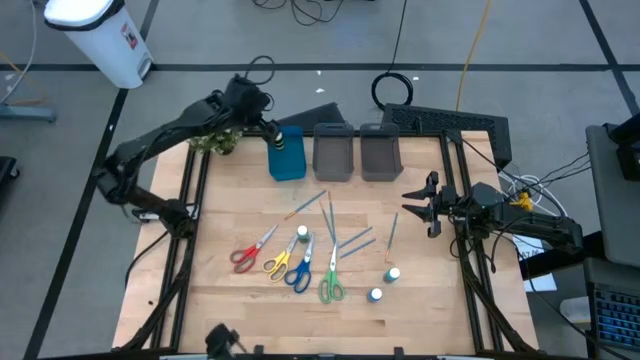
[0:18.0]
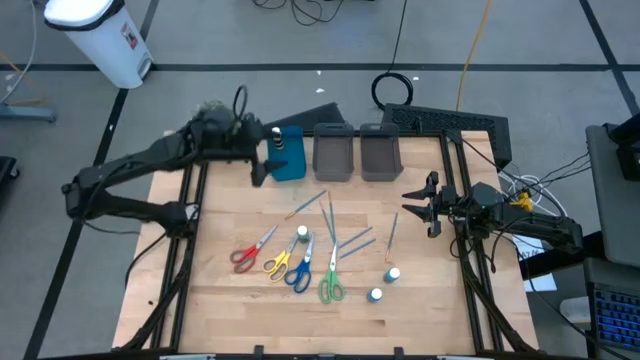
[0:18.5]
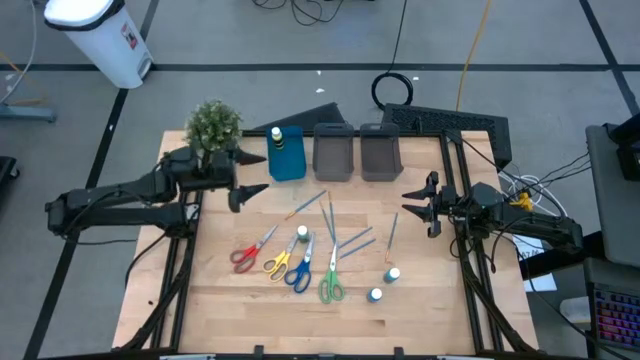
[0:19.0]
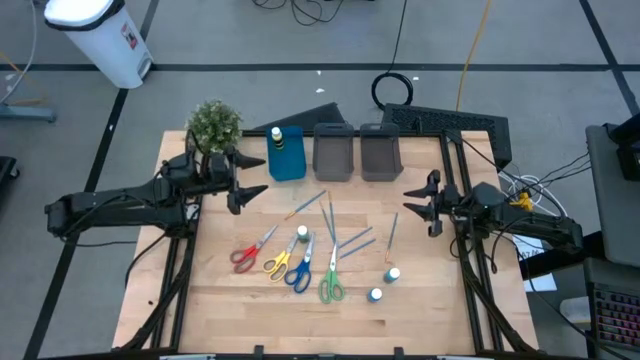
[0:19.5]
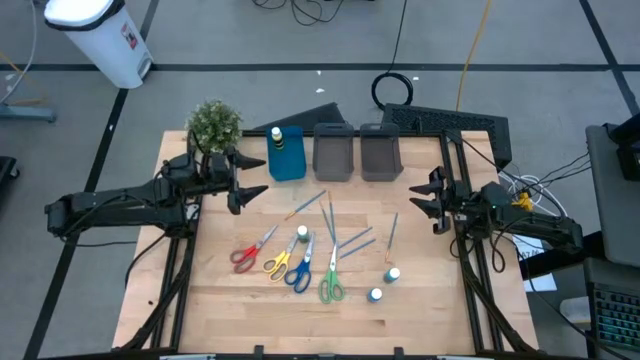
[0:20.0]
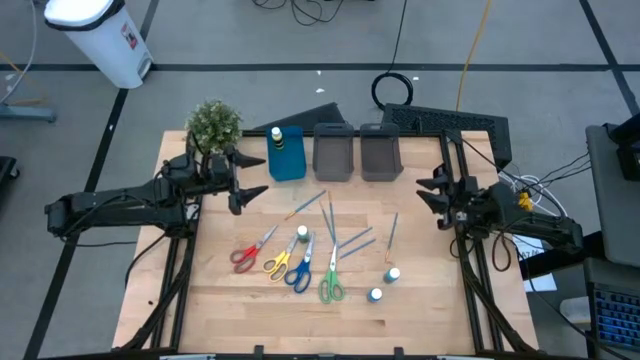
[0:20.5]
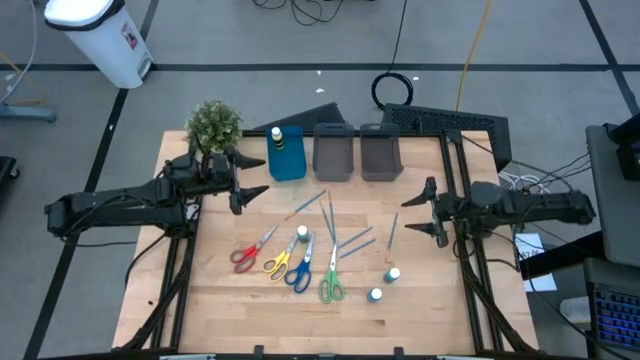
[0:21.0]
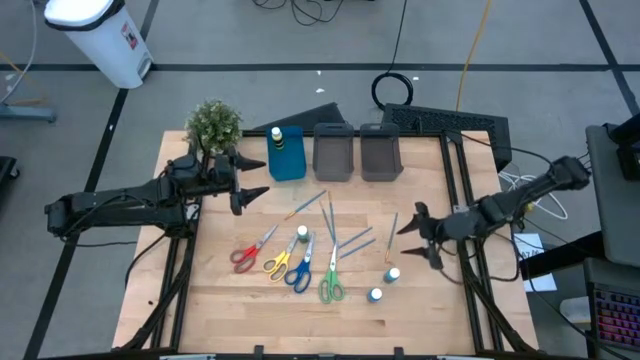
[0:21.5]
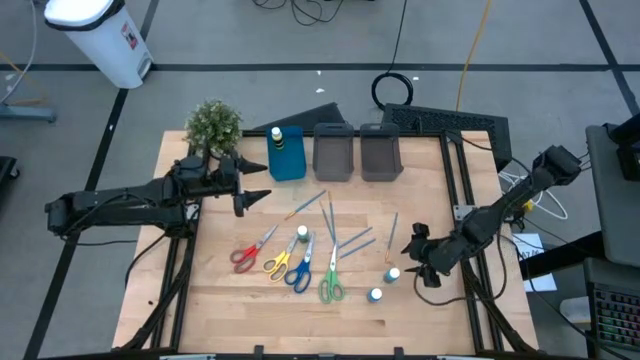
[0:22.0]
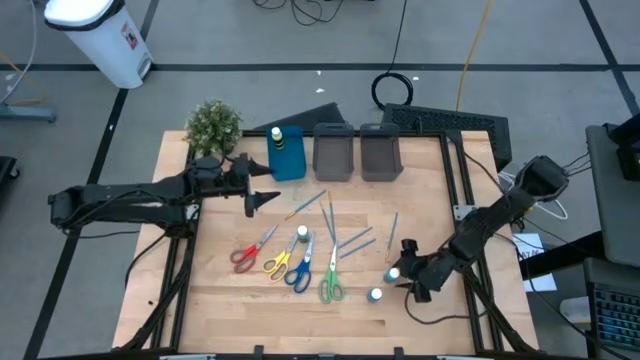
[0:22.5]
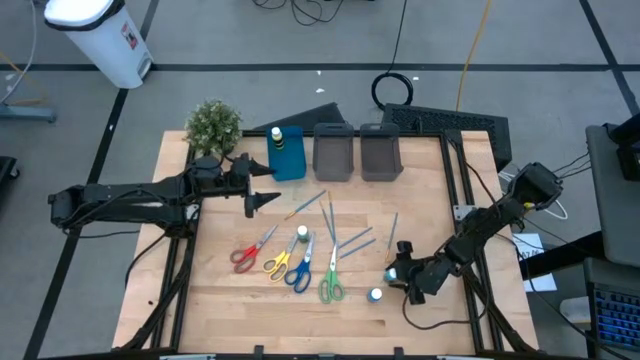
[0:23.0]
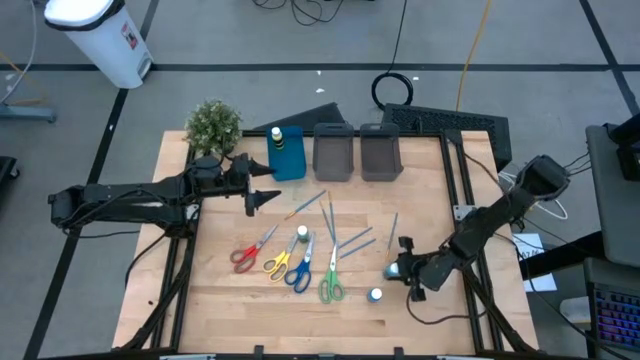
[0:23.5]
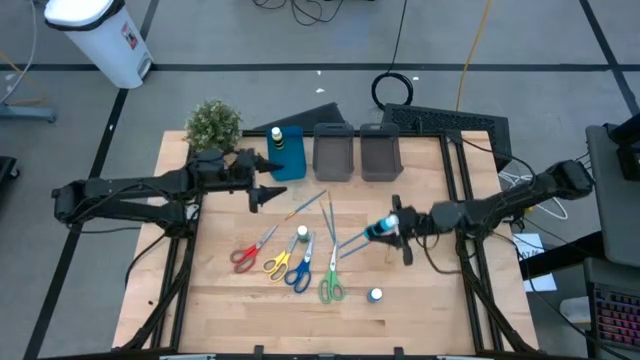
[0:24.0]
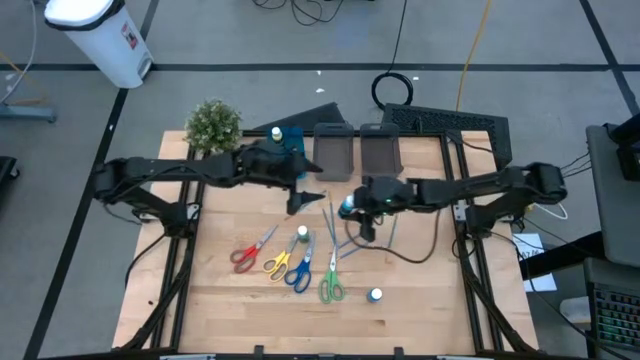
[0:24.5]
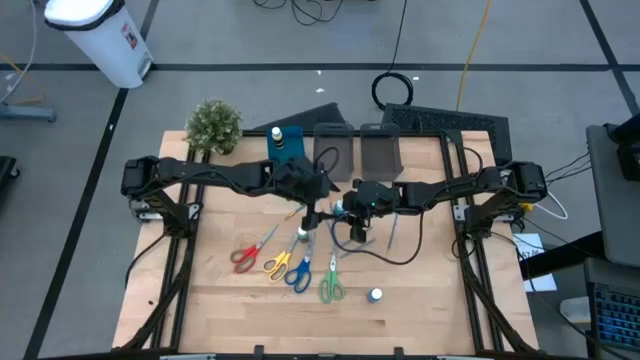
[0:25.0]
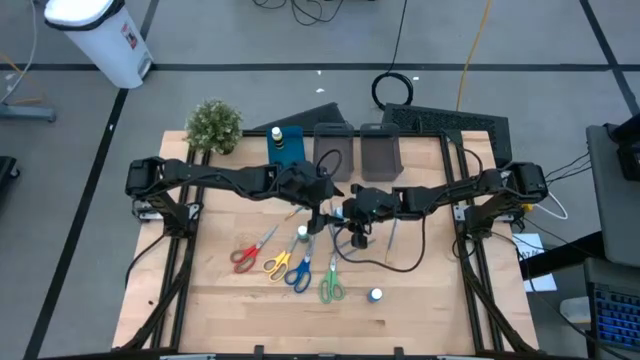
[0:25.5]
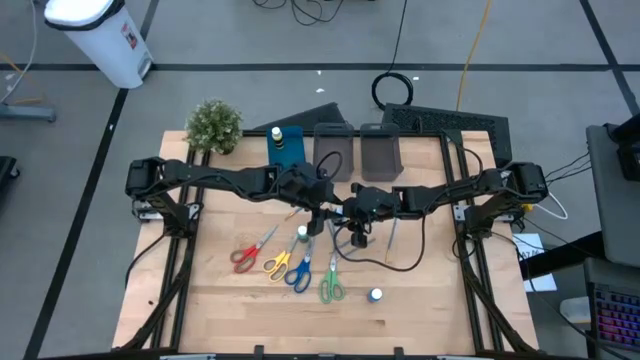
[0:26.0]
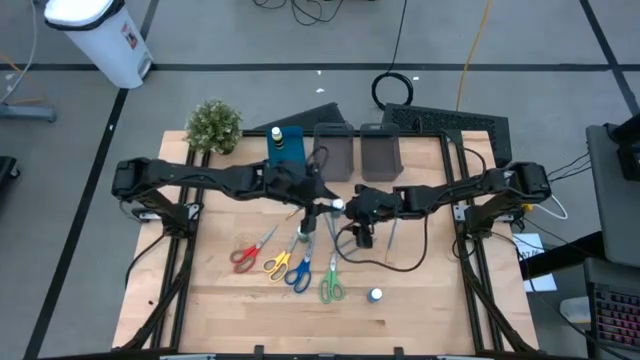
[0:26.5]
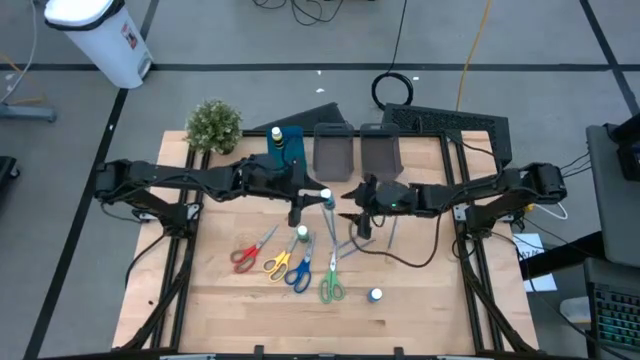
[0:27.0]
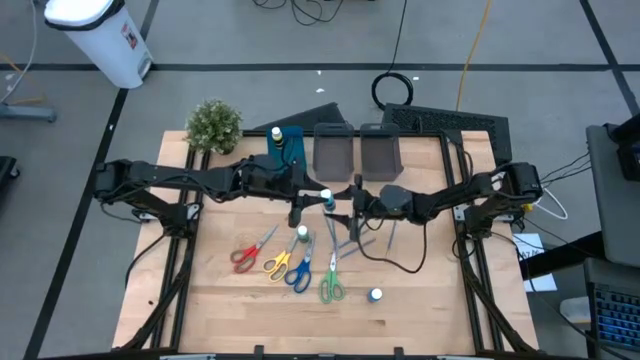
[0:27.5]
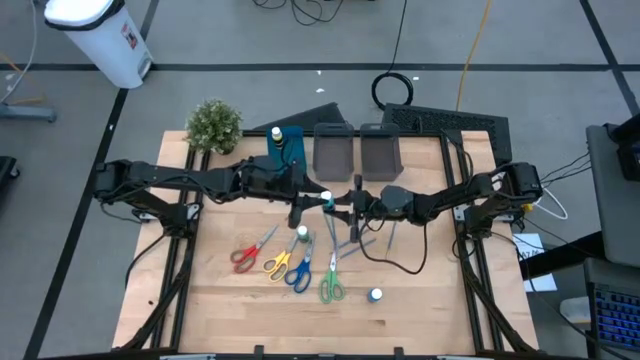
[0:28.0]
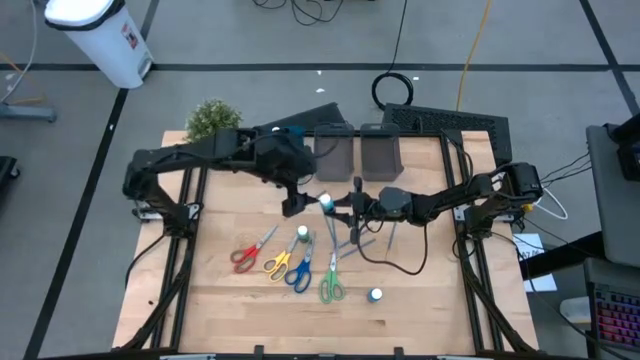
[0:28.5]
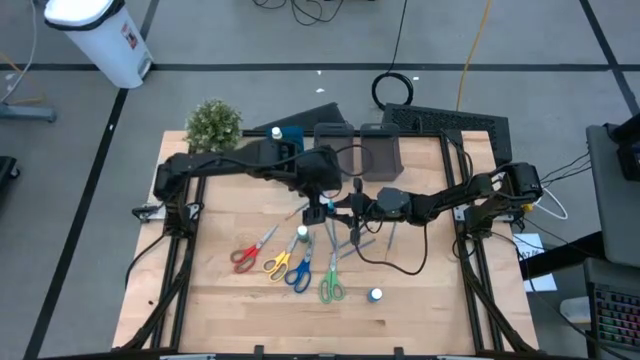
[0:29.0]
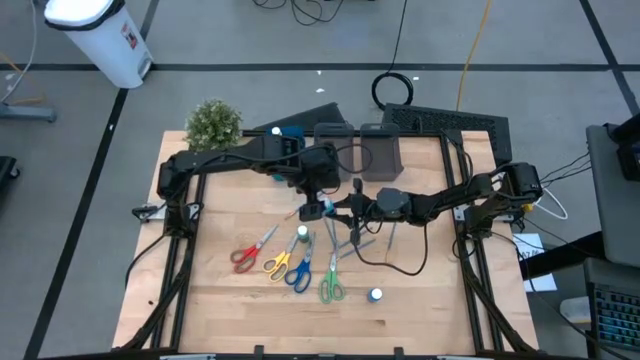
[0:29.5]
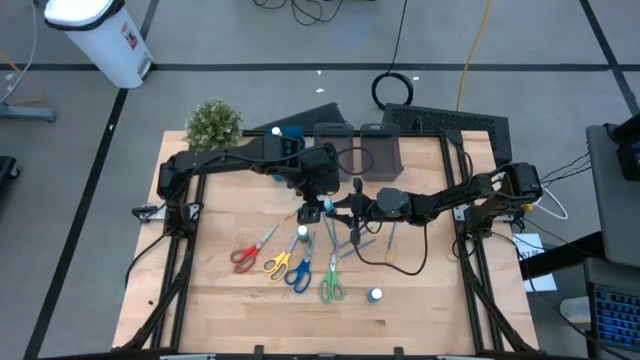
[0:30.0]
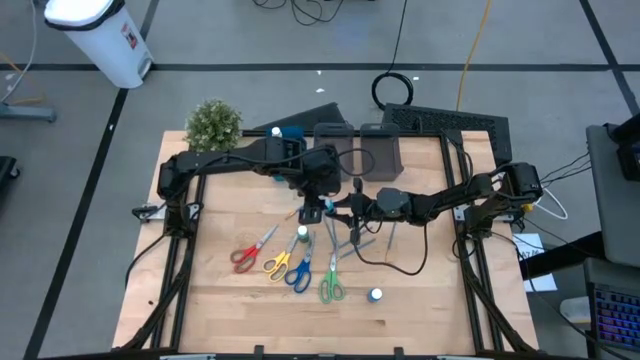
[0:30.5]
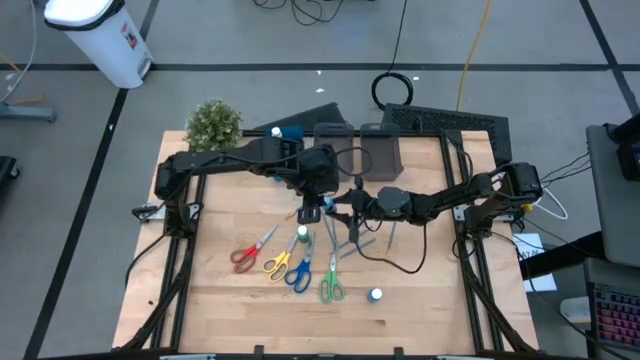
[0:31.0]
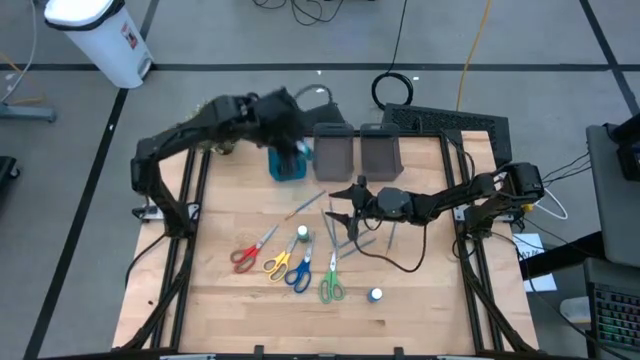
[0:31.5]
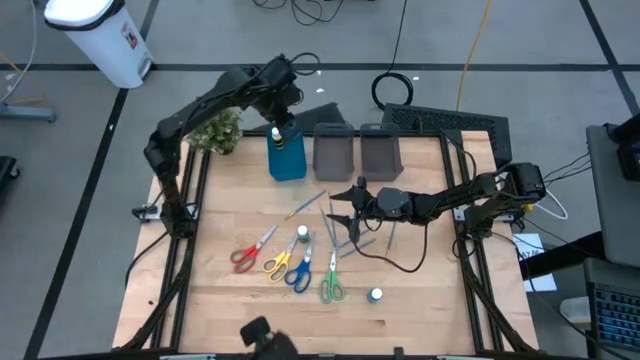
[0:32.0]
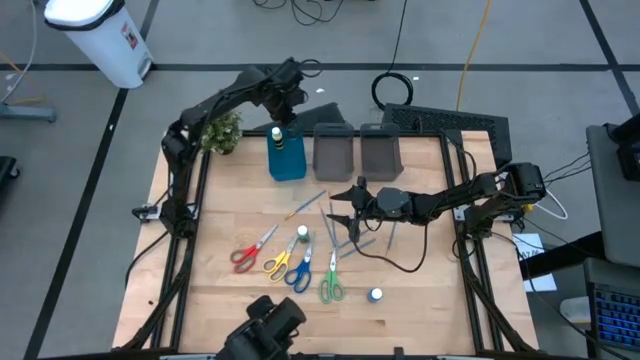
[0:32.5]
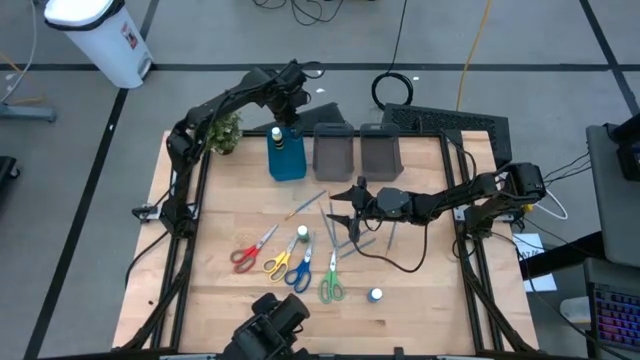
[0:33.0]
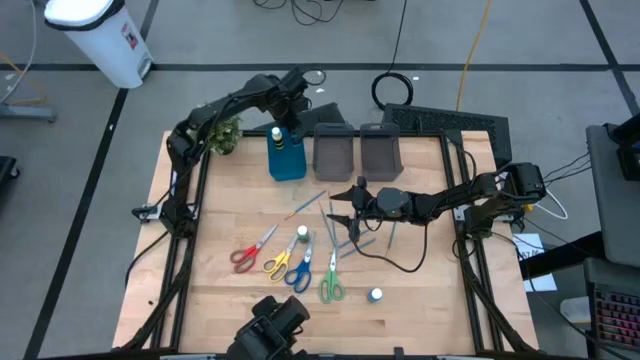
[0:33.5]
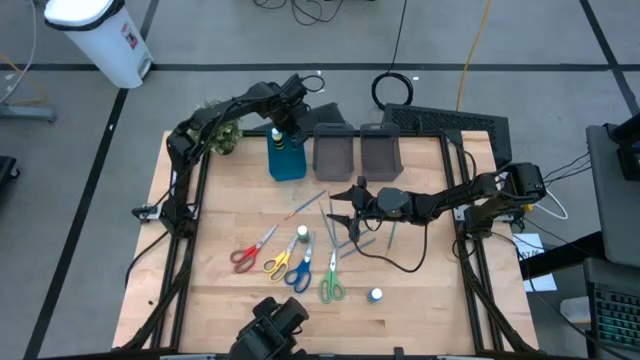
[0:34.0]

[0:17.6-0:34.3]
Task: Pick & Place Paint Supplies
Put the light blue paint into the blue bin

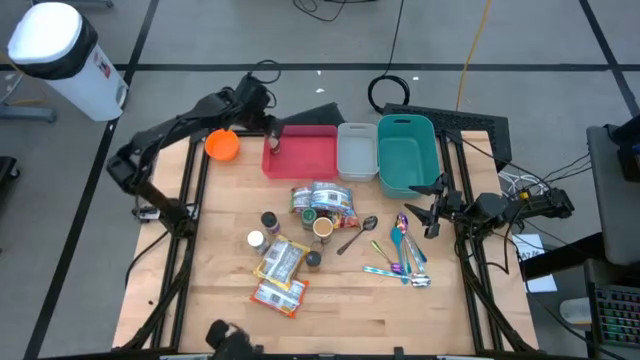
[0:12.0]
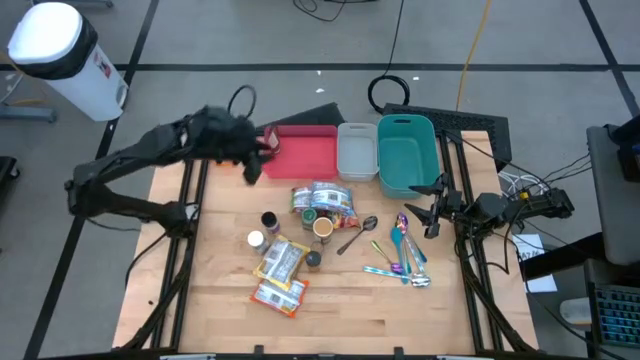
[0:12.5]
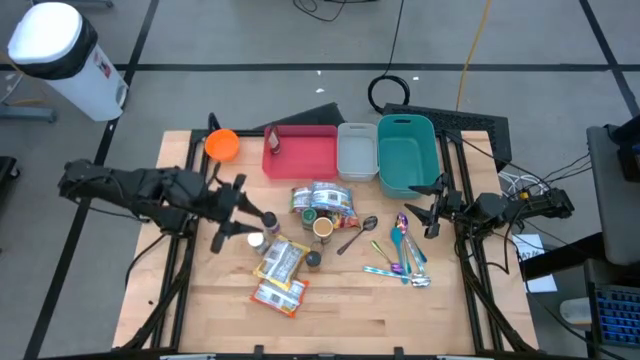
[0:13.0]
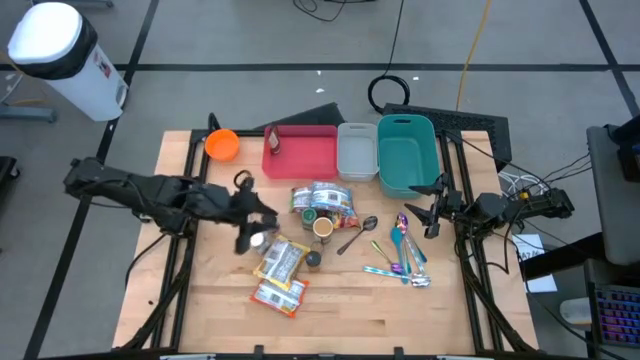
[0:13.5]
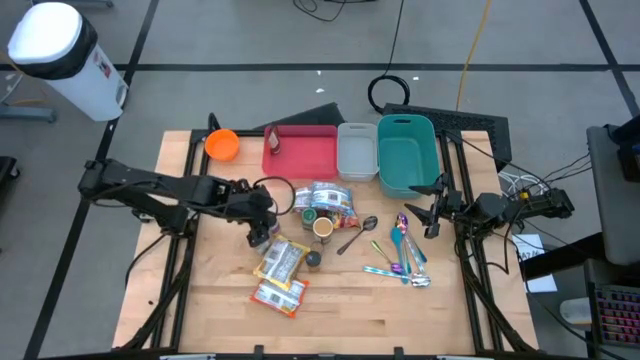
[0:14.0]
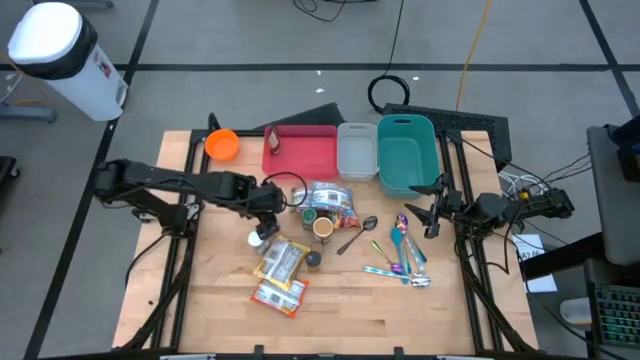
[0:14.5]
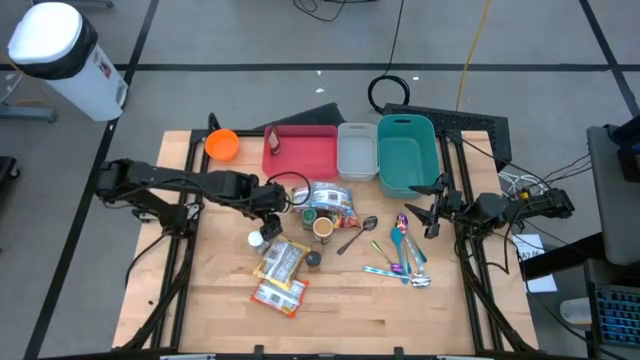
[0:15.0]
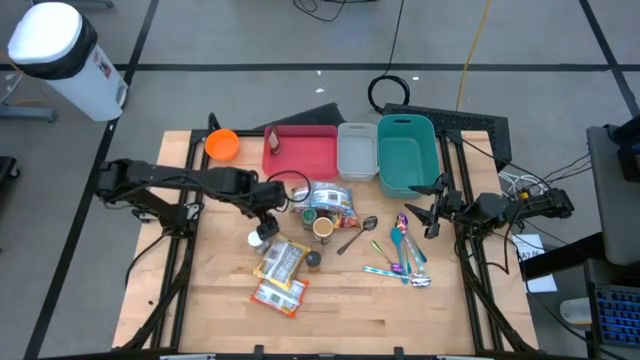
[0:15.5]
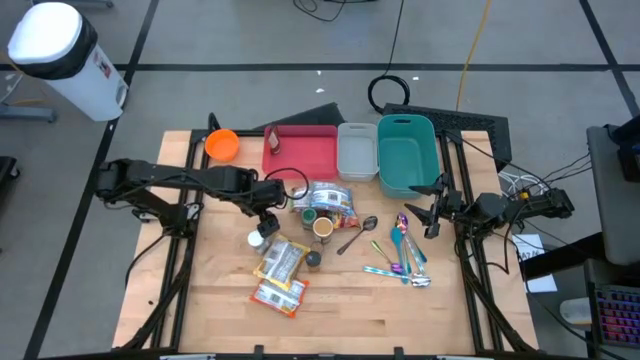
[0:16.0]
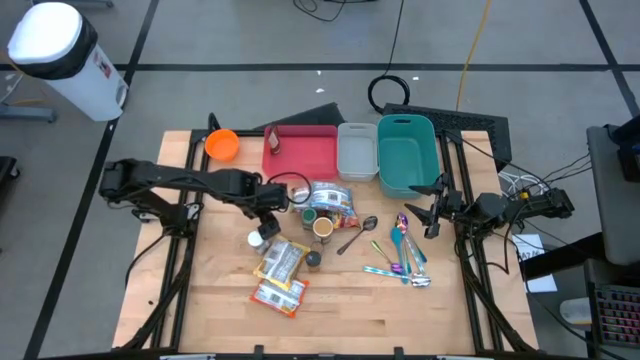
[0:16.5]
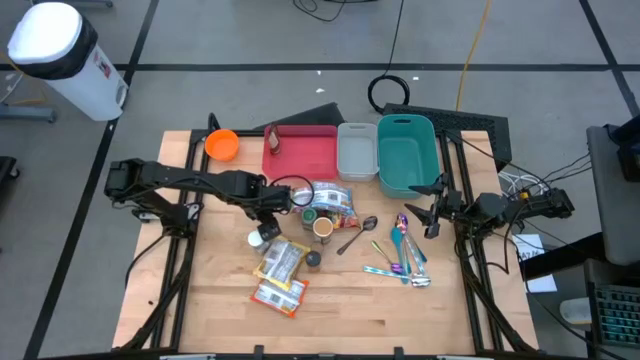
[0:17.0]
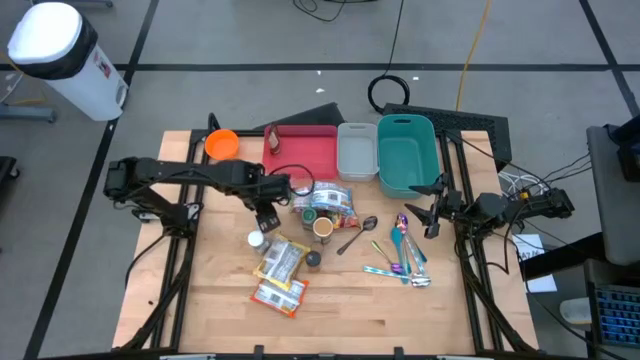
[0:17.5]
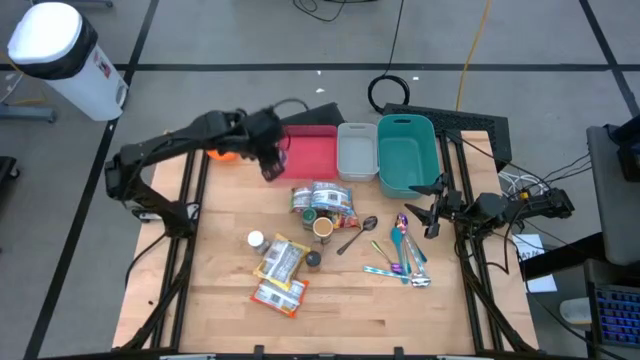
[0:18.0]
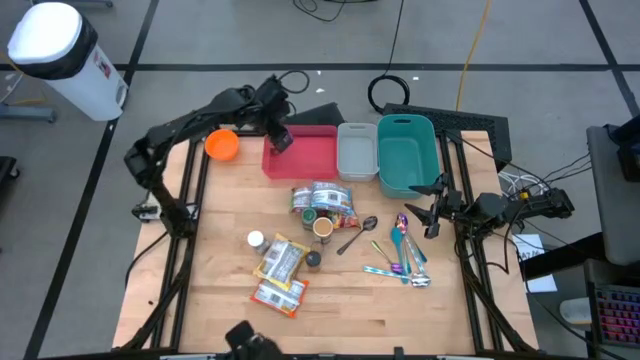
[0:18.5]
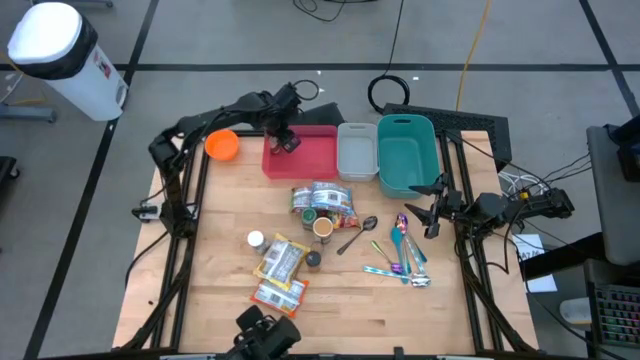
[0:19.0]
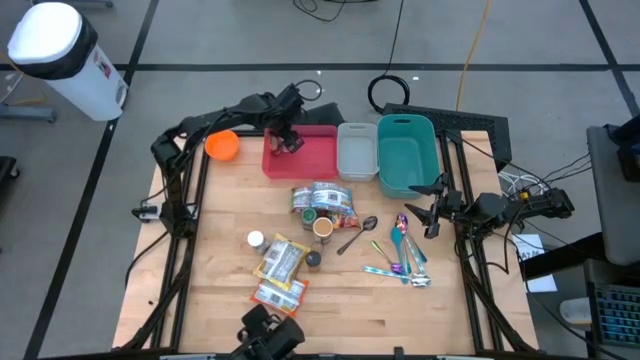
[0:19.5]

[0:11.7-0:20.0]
Task: Pick & Place Food Item
Put the violet seasoning bottle into the red bin
